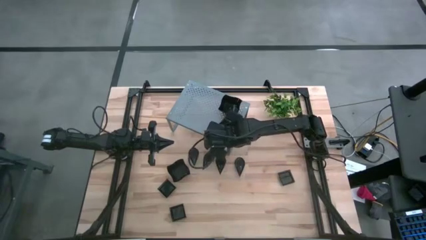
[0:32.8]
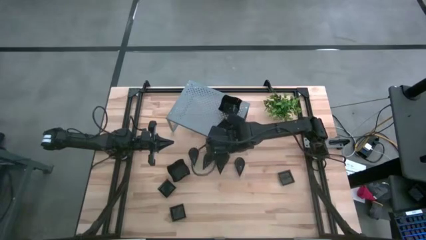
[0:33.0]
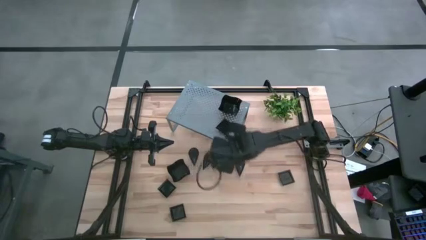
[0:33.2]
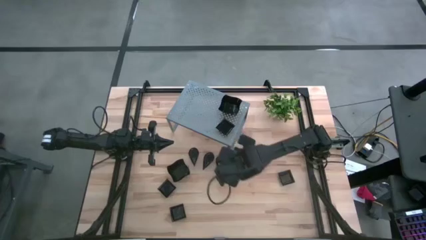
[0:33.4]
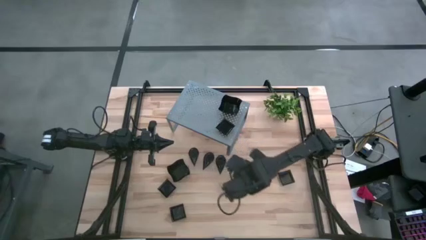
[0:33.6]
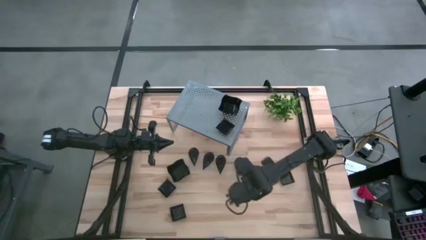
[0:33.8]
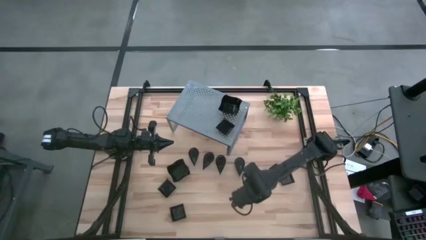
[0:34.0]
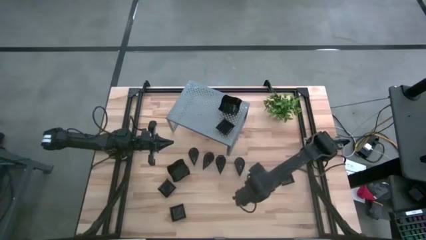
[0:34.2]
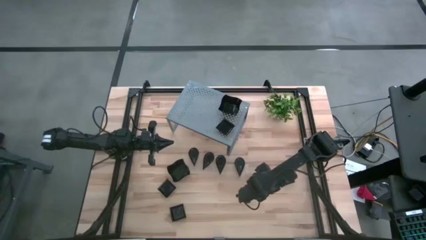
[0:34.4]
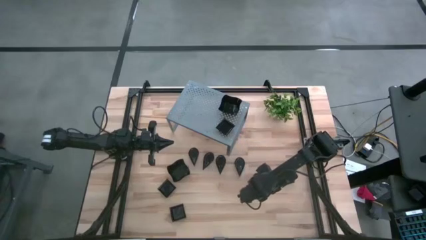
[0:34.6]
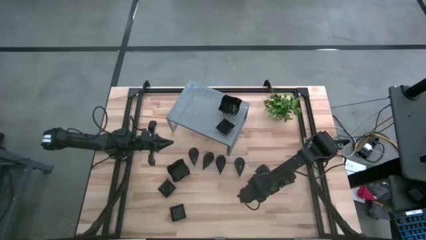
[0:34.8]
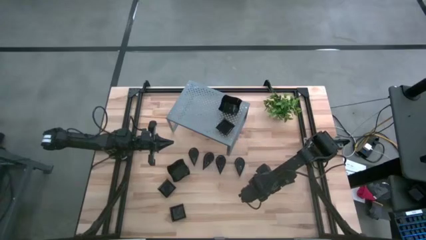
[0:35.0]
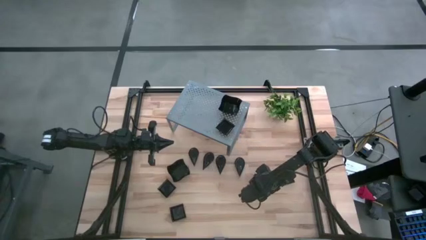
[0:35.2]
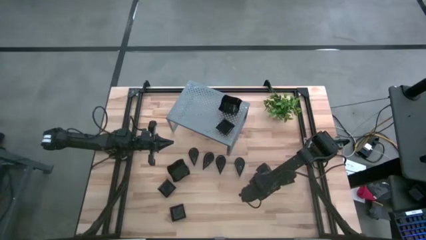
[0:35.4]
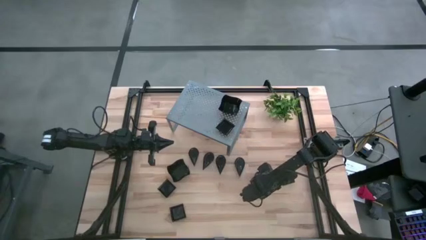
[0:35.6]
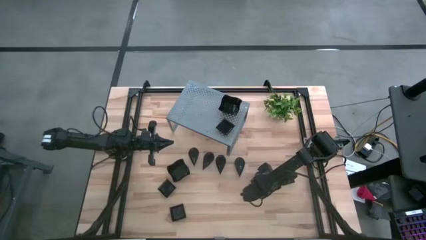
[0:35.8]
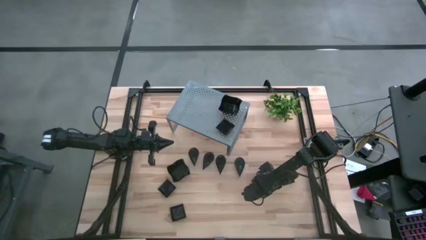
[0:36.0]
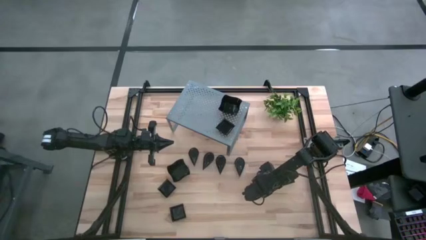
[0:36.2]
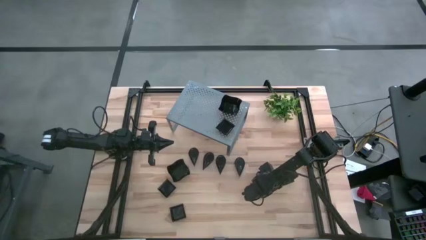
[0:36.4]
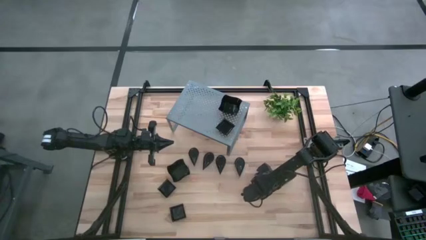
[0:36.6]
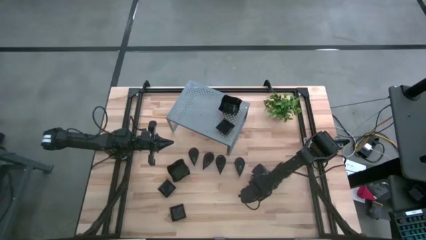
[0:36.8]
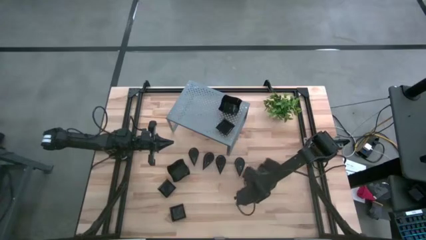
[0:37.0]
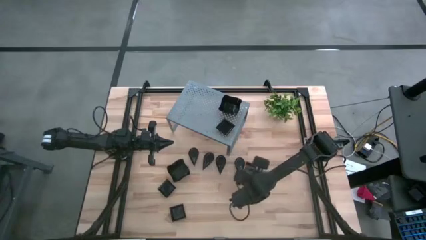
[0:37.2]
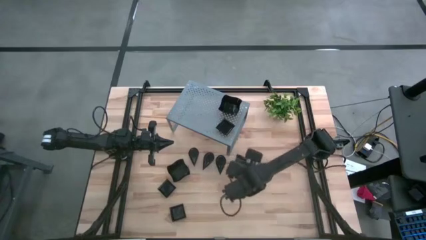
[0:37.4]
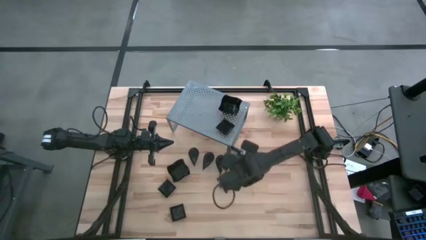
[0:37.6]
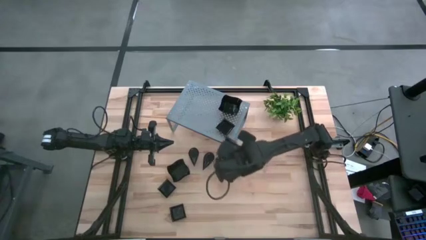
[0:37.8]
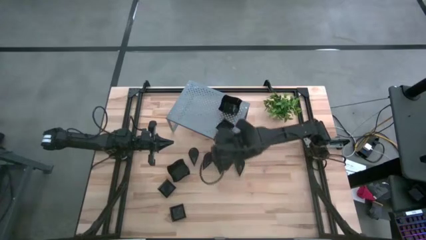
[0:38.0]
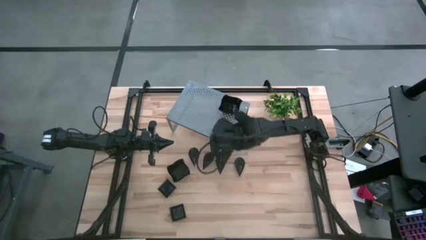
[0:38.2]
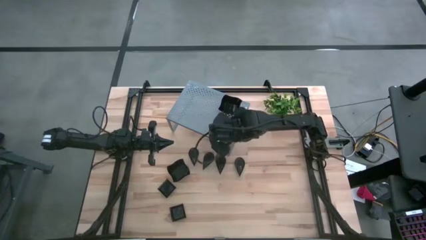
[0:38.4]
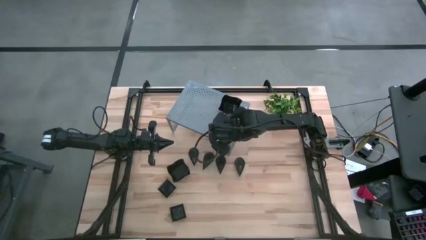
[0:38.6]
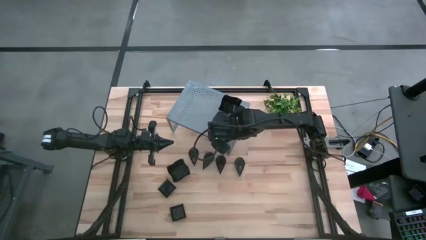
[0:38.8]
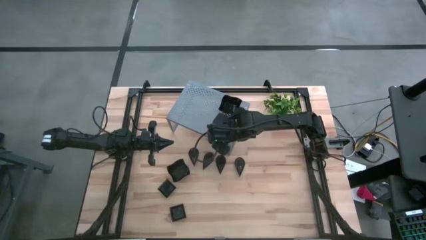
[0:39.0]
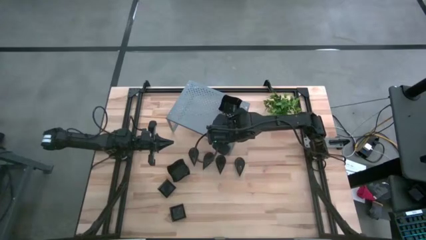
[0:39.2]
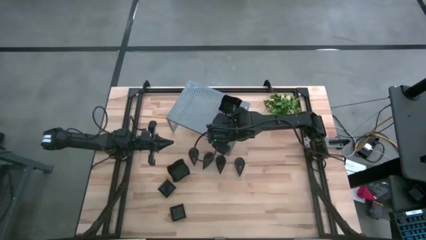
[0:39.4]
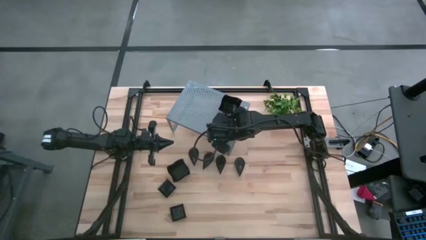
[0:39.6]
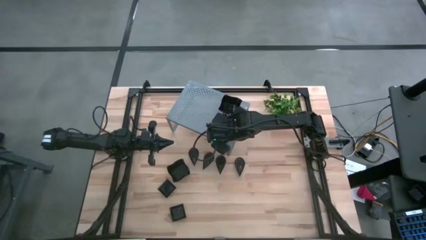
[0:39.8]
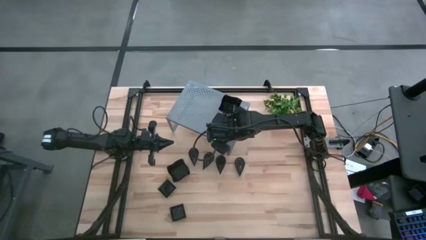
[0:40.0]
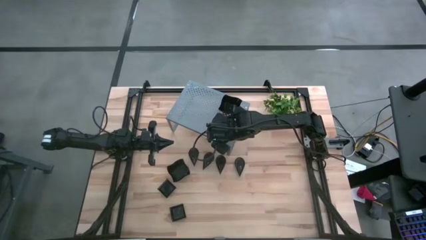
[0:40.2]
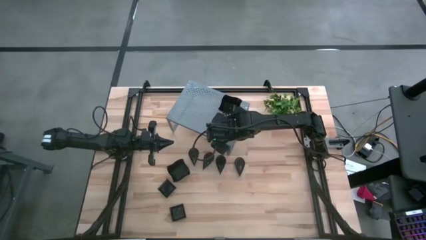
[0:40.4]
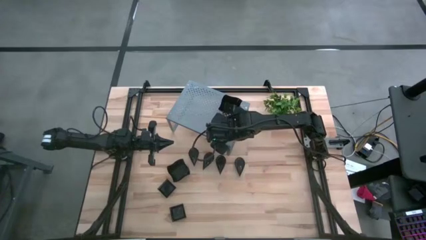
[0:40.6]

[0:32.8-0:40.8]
Task: Pick & Place Mini shaped plates
Stack the right square plate into the square plate on the shelf

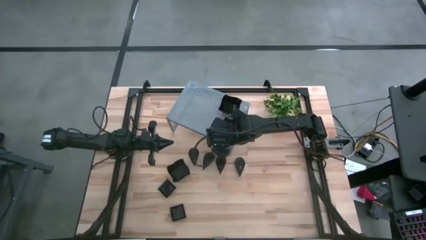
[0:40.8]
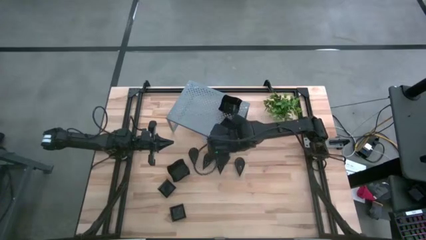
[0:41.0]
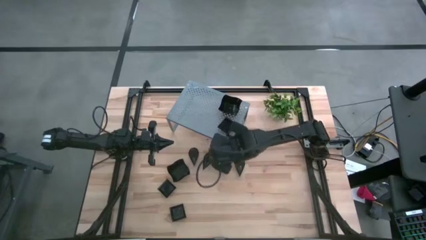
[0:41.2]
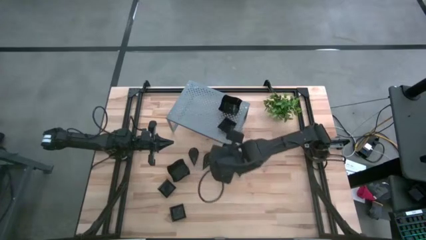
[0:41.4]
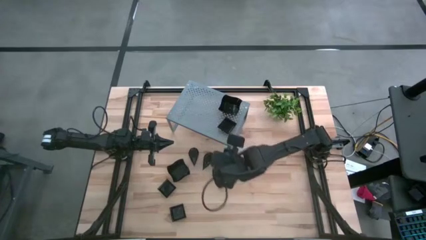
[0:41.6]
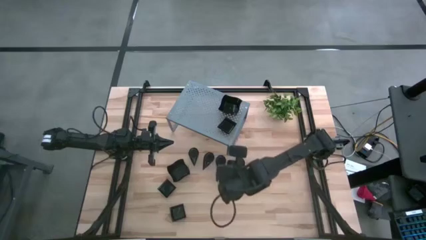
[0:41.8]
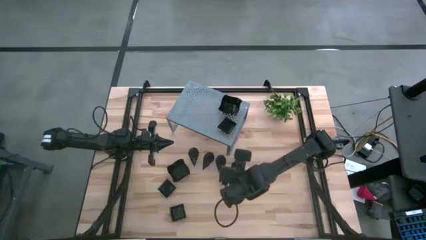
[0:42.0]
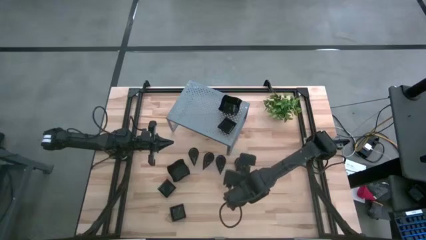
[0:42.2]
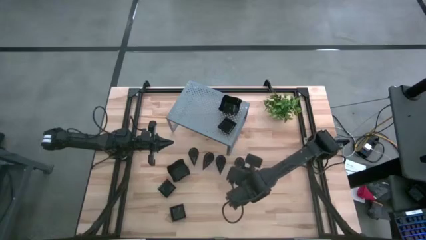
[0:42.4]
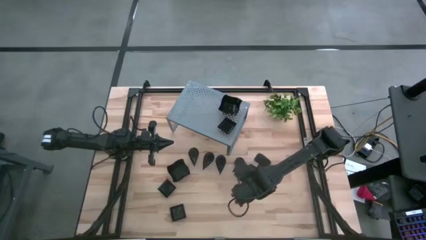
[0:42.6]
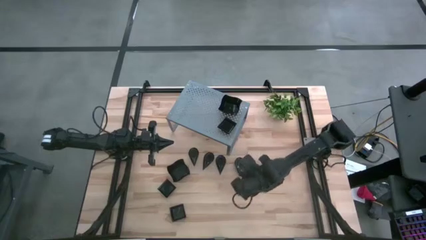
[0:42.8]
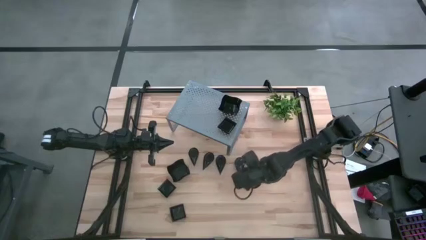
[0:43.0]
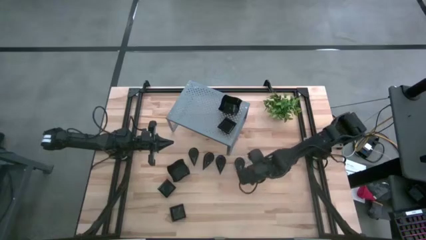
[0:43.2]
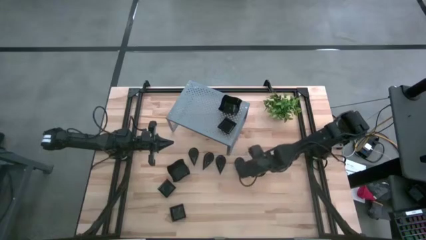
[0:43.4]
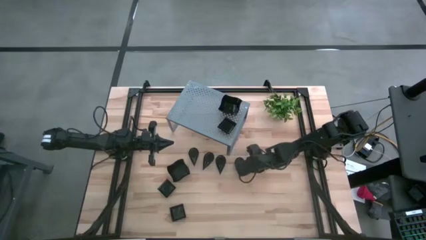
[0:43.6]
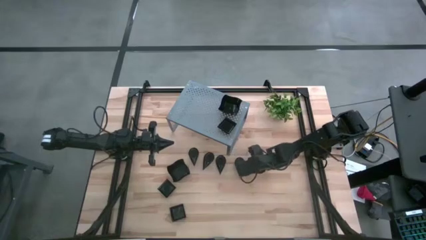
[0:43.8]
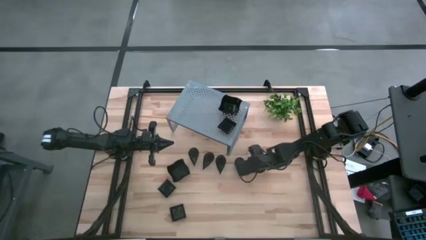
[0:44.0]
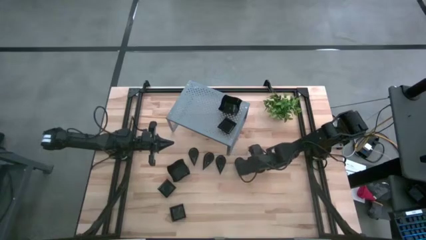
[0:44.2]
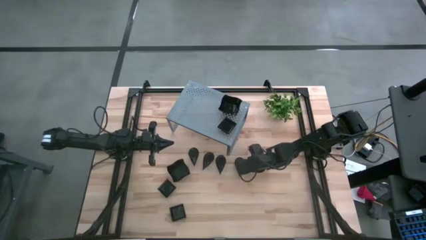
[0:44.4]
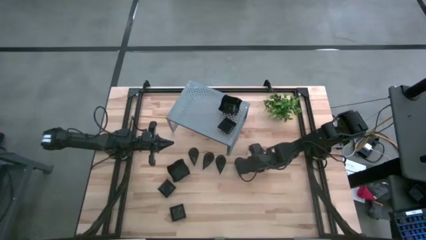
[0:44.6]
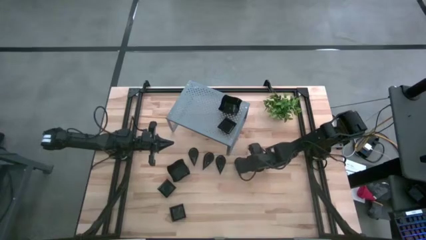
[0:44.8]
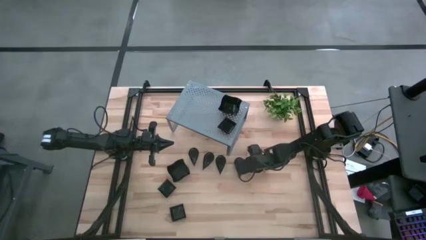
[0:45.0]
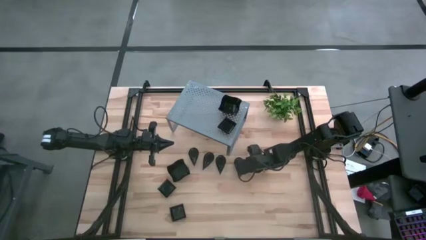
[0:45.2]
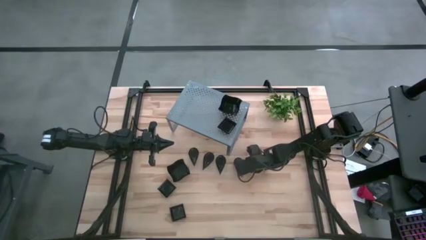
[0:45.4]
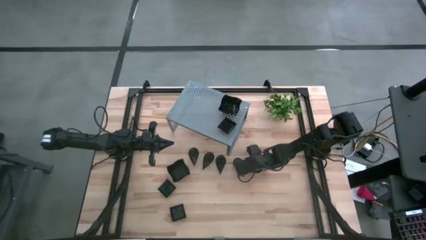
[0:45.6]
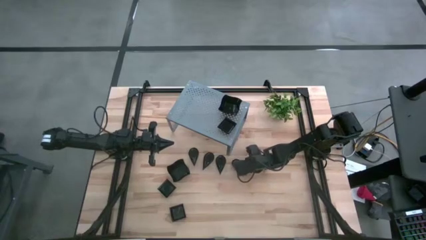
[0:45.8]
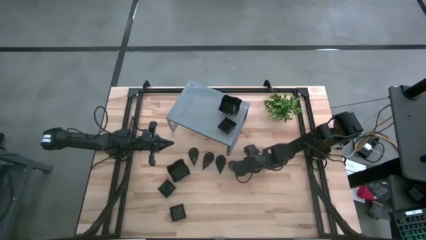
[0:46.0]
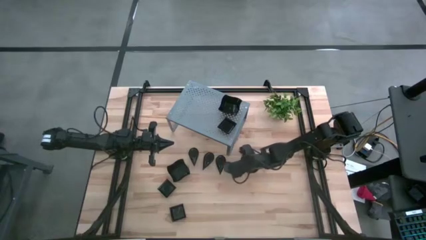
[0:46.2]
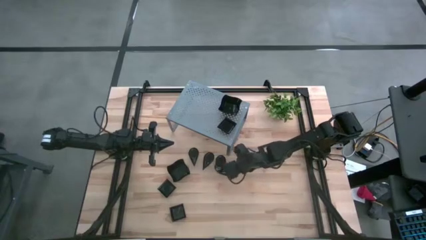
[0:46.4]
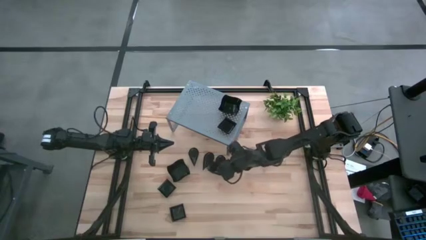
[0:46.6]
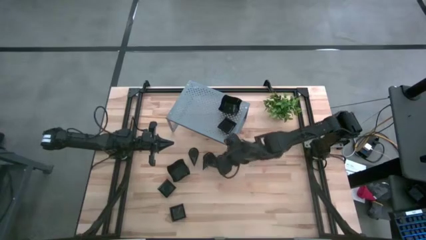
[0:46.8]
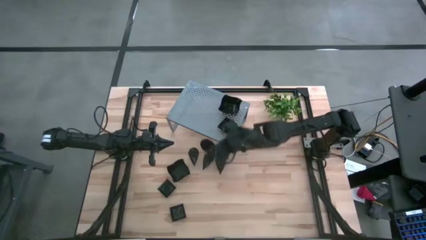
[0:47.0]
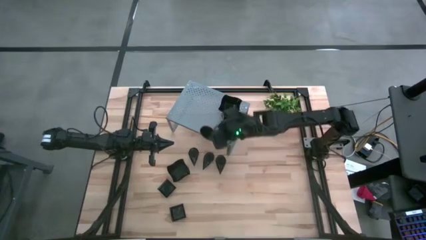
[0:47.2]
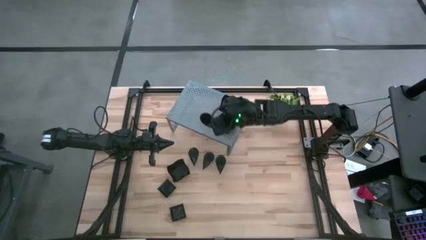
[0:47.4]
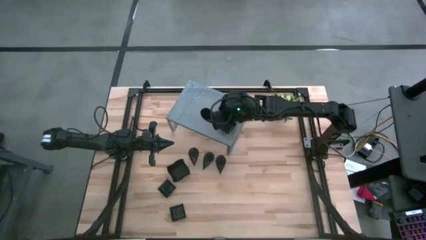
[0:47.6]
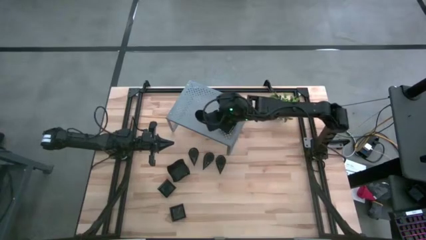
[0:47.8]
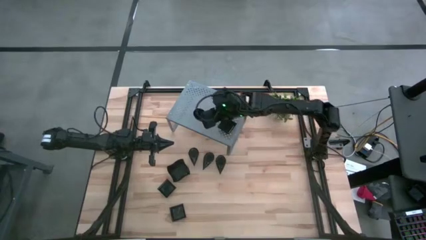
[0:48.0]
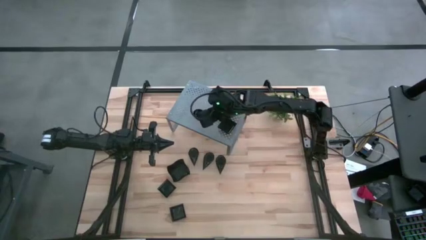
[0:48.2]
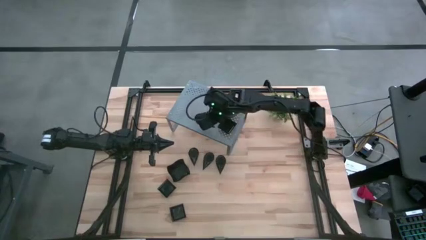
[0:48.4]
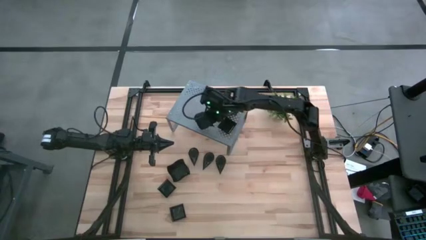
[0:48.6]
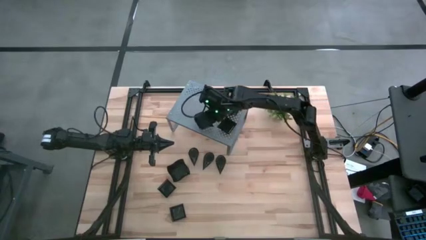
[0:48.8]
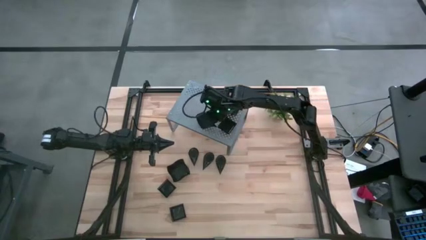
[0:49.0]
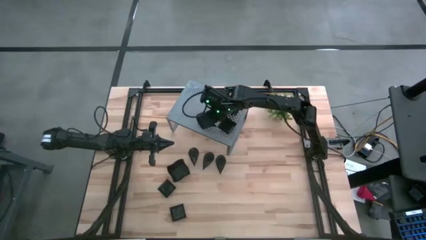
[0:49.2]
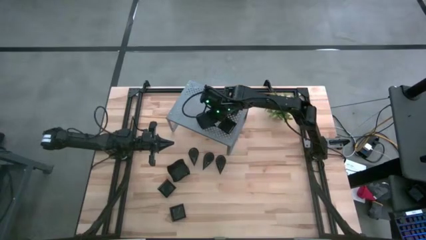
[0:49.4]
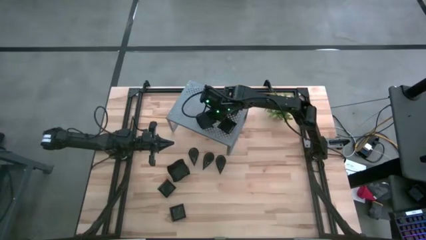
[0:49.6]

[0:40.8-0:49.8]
Put the right drop shaped plate on the shelf
